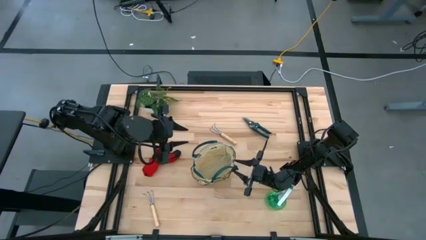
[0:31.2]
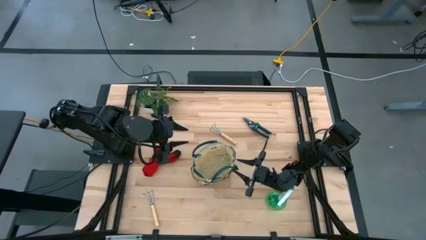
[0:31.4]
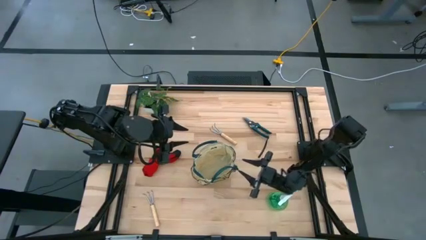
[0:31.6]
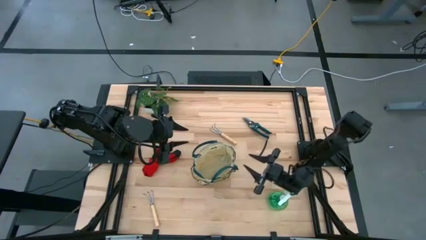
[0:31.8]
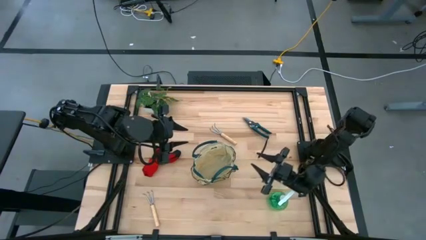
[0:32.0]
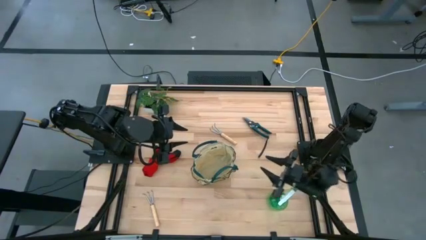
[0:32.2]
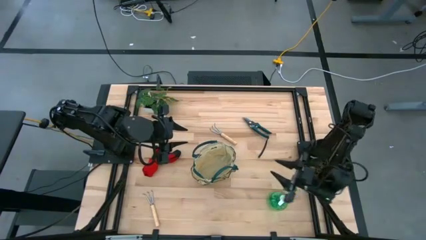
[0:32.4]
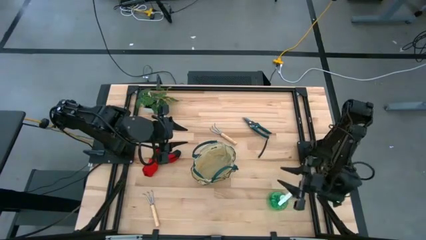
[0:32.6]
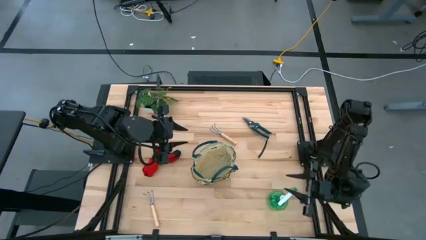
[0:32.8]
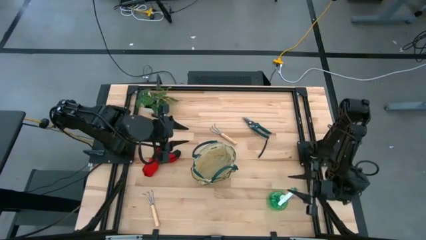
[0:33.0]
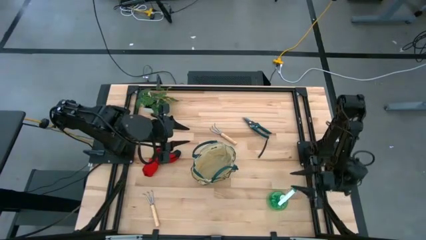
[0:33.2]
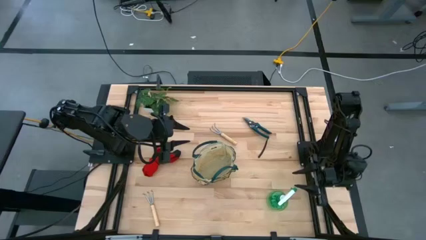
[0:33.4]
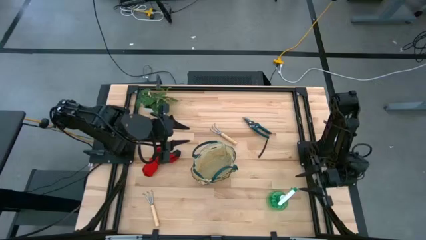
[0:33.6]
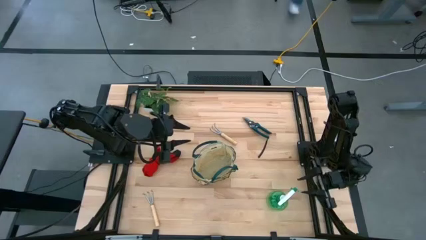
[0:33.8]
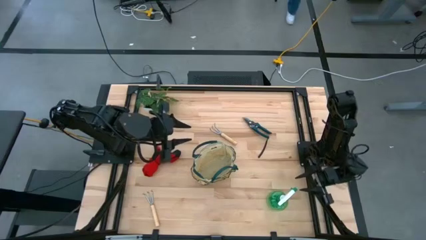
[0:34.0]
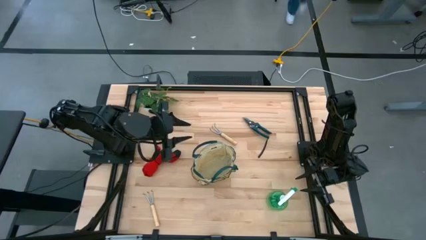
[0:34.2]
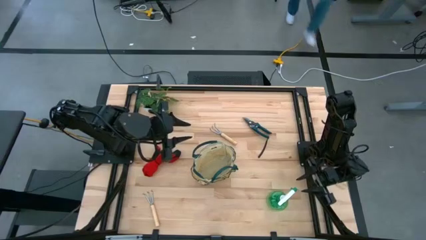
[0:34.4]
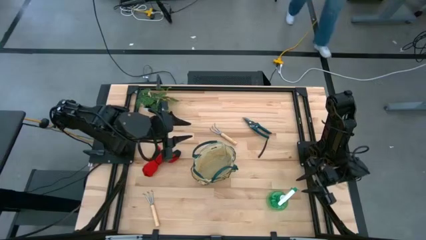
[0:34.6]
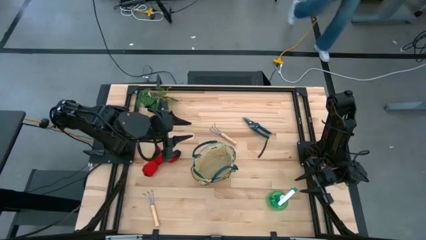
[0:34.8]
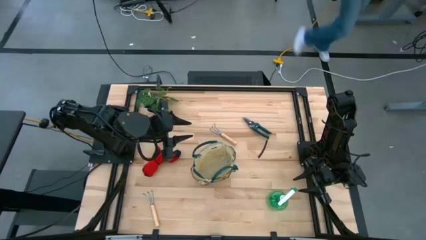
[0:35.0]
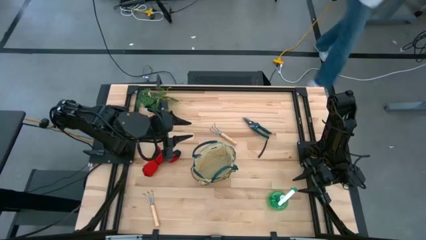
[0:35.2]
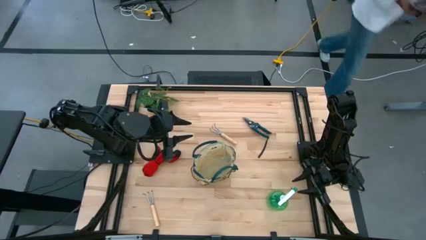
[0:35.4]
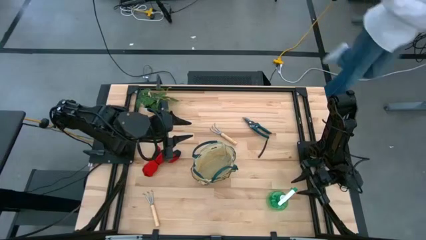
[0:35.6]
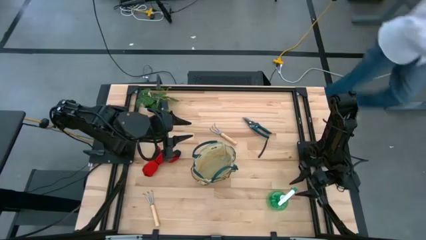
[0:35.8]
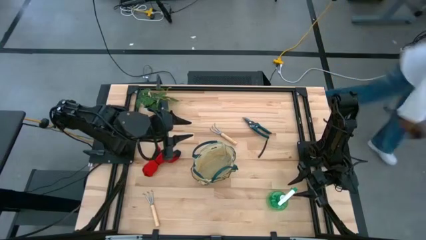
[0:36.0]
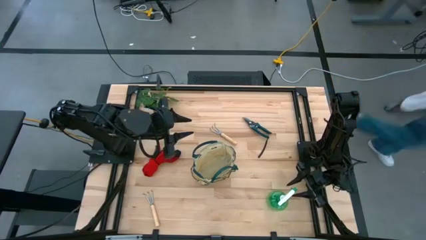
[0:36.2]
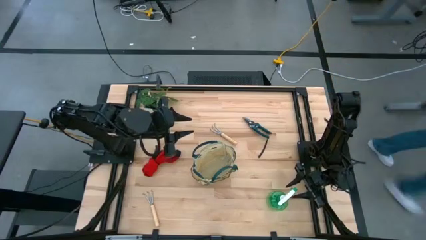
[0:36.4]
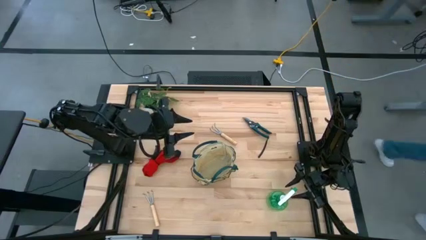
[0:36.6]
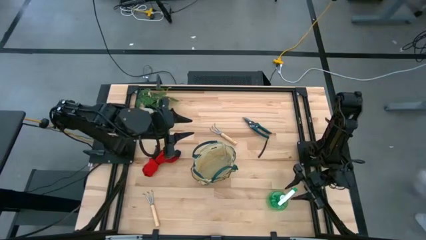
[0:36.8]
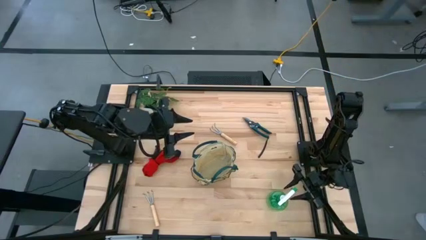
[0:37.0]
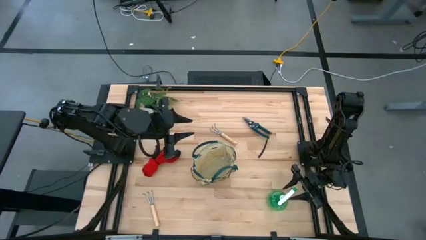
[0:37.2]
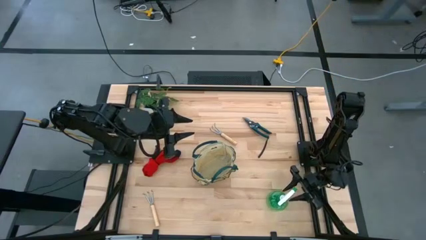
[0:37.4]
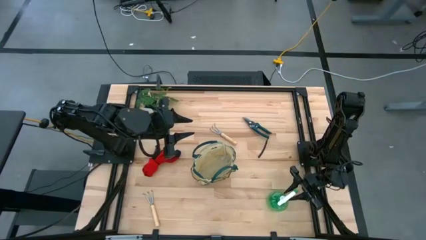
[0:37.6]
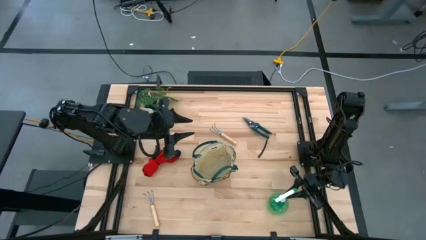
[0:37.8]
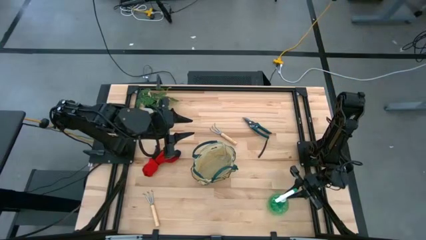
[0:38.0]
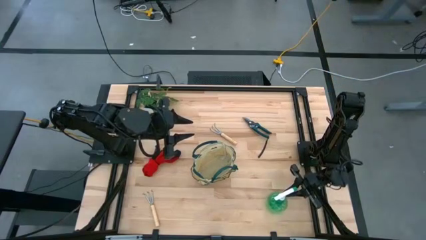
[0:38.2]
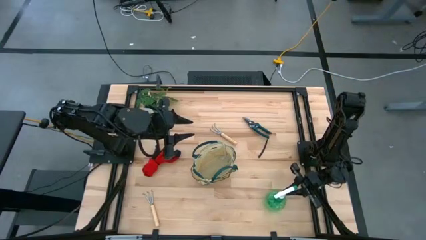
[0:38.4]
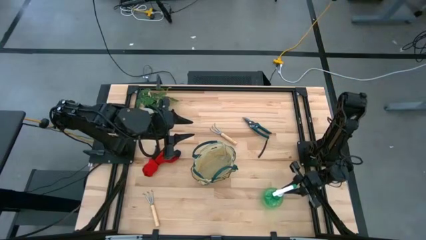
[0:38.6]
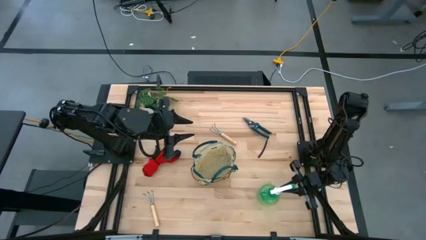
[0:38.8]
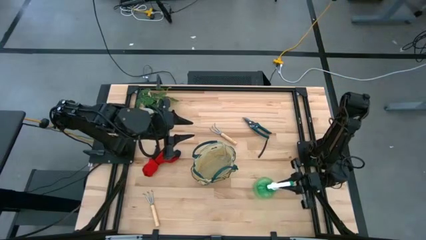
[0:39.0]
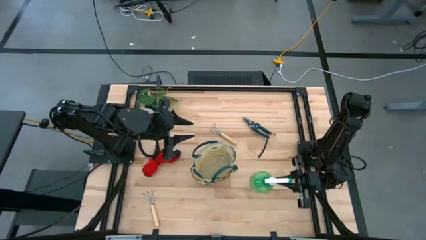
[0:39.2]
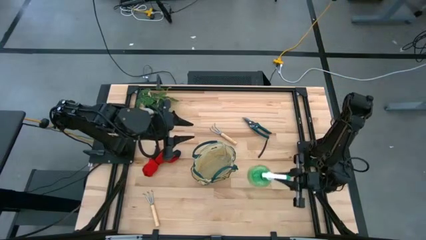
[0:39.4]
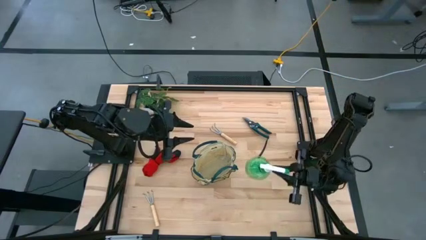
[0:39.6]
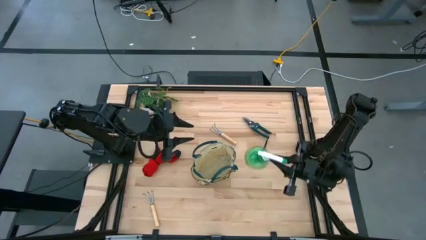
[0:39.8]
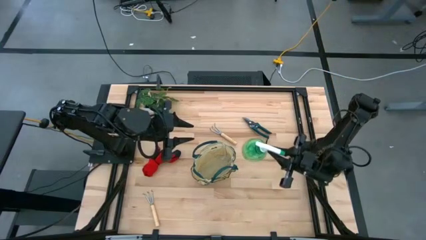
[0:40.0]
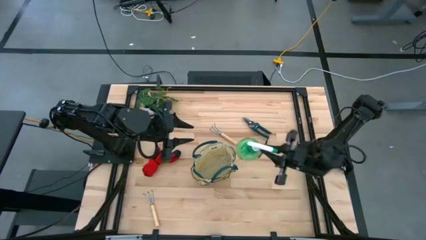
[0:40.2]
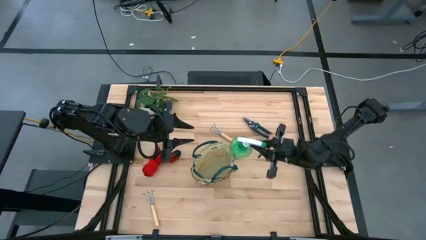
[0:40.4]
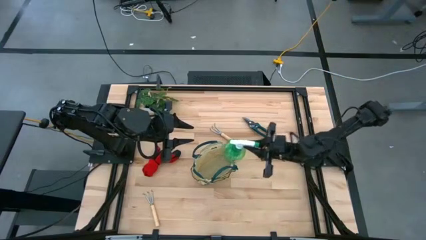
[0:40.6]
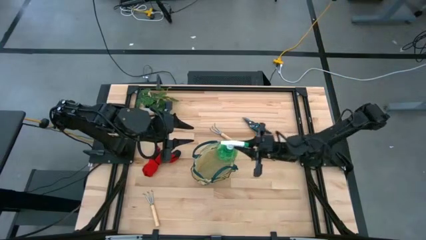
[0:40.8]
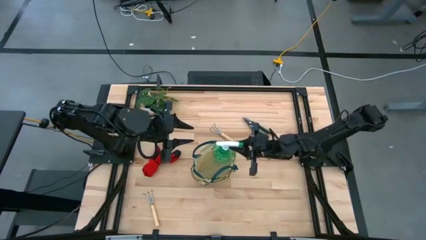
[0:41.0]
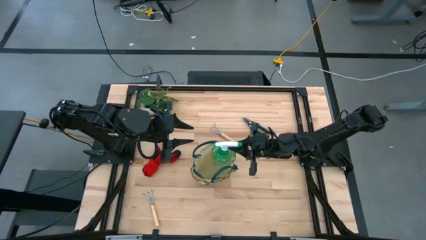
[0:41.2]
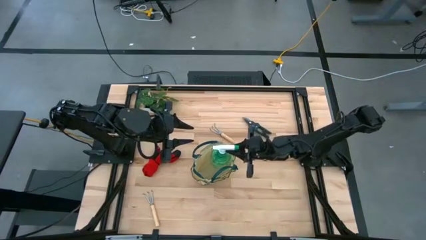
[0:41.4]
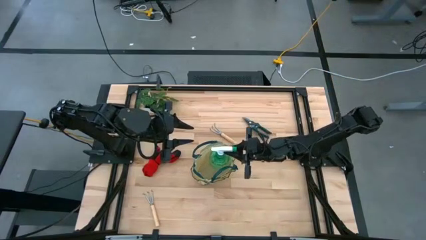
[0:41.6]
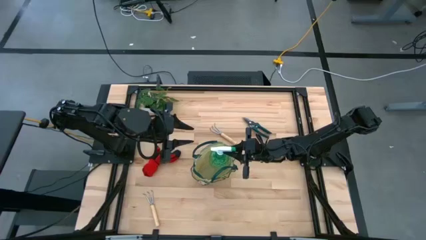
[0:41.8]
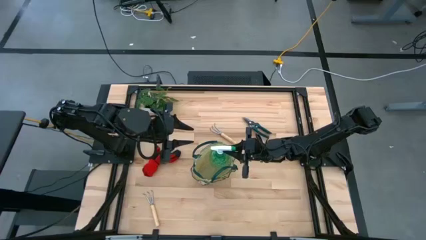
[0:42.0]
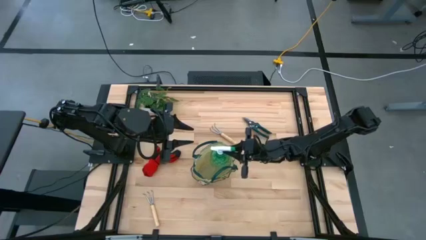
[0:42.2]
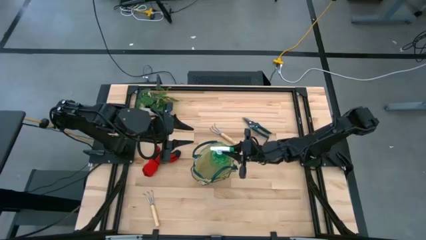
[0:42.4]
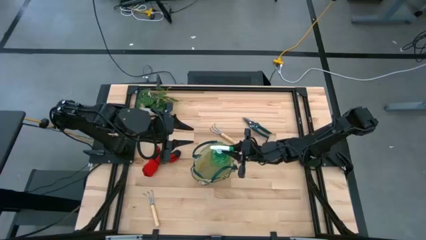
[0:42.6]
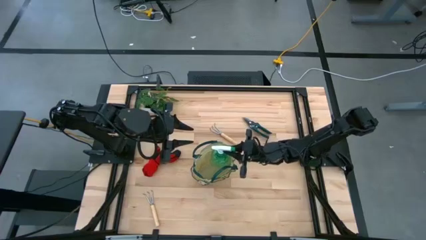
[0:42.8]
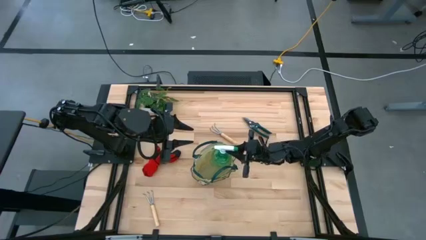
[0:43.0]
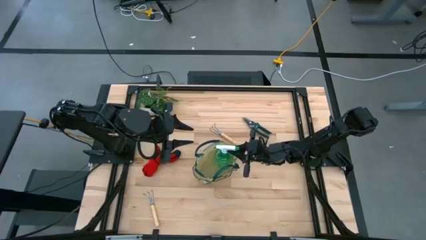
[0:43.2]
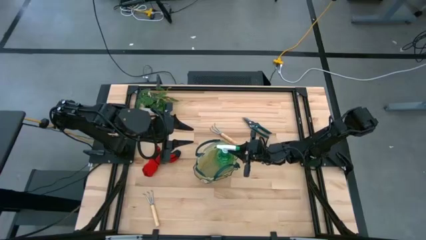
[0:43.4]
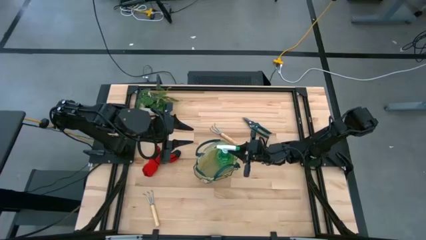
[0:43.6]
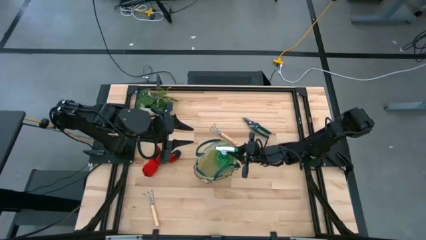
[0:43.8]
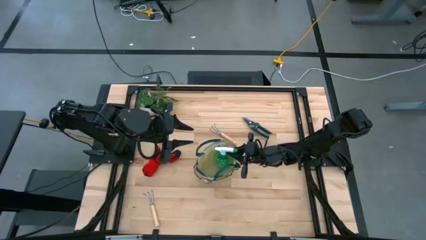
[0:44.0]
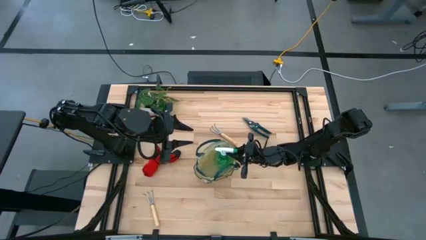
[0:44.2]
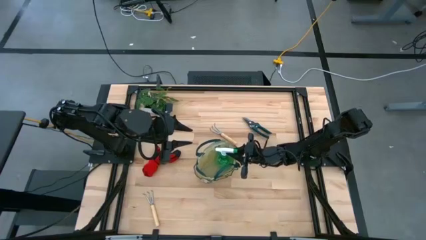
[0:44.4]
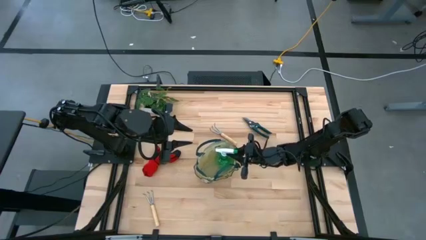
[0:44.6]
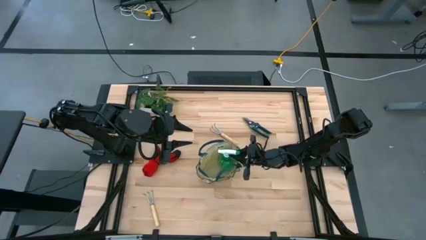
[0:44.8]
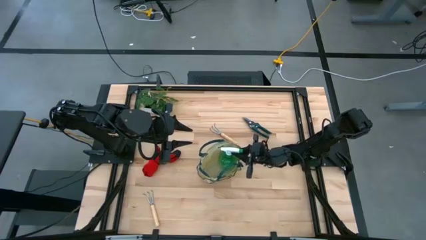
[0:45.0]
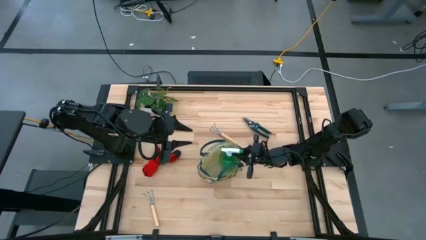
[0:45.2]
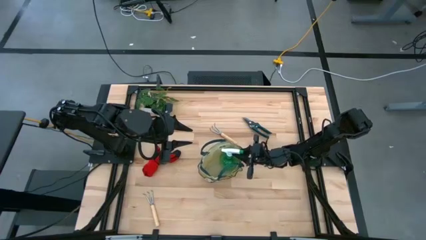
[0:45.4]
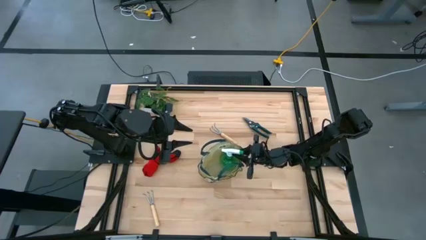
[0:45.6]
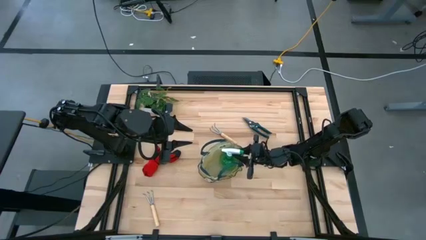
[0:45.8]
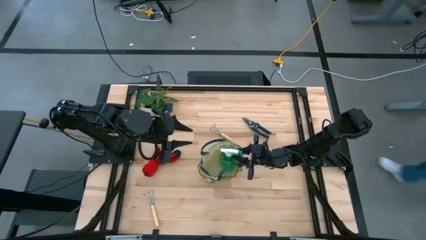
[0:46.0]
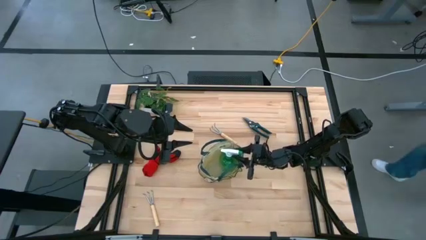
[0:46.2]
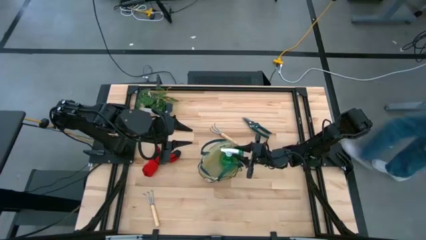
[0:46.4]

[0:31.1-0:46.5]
Task: Pick & Place Garden tools in Gardening bag
Put the green spray bottle into the green gardening bag

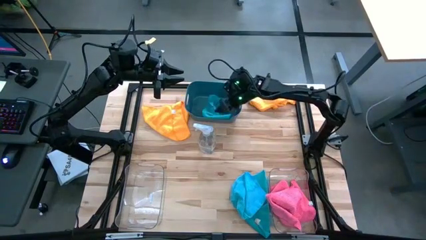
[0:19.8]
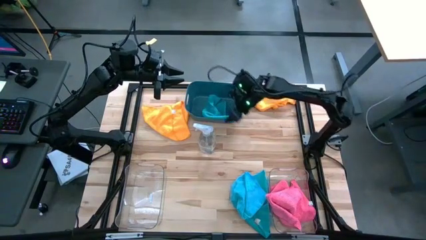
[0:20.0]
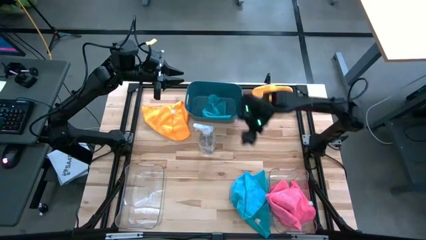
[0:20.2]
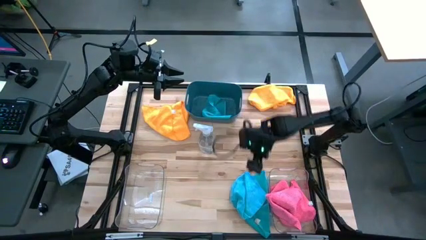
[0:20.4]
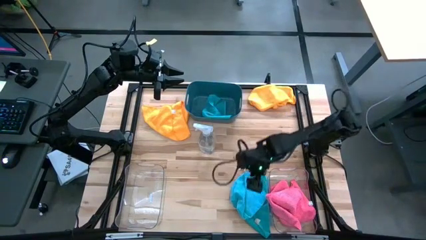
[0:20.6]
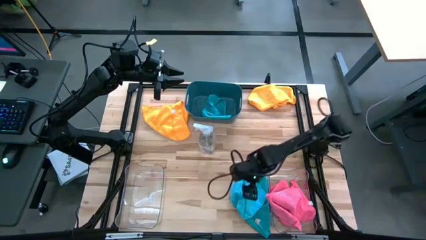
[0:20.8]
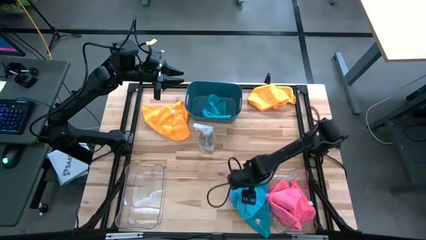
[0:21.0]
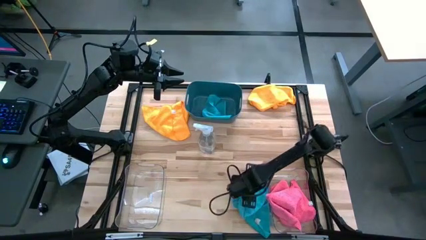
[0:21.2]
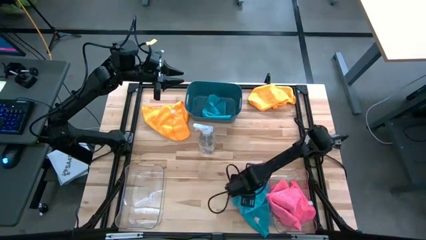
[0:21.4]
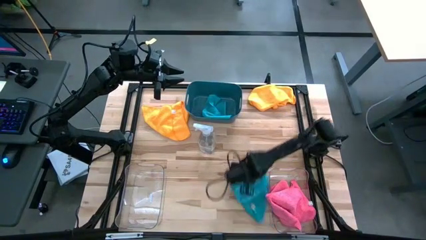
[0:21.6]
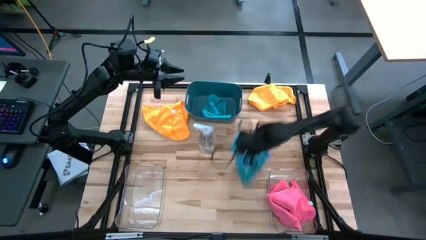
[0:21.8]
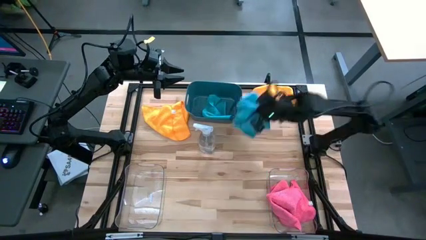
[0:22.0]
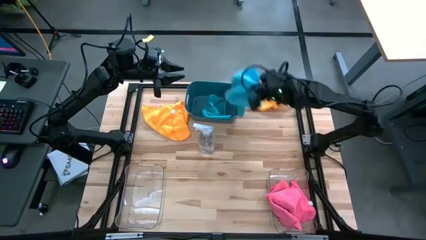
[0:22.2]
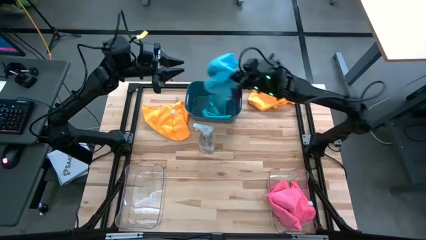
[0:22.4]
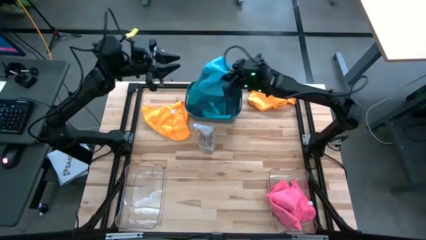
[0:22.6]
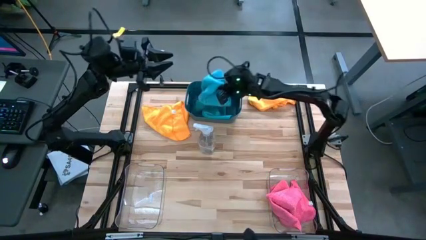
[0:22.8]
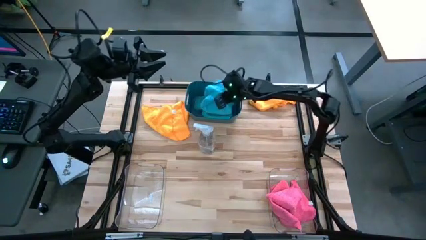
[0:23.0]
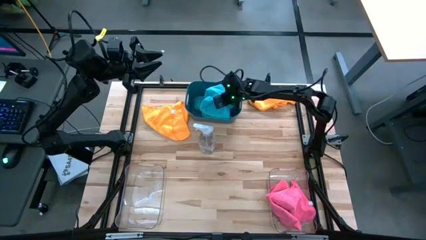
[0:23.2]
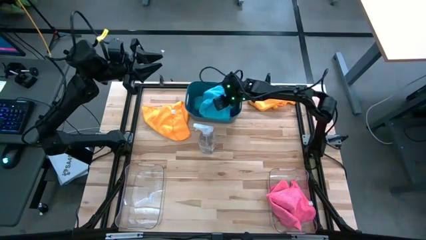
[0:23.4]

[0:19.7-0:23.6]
Task: Sort microfiber towel by color & place in baskets
Put the blue microfiber towel into the blue bin
